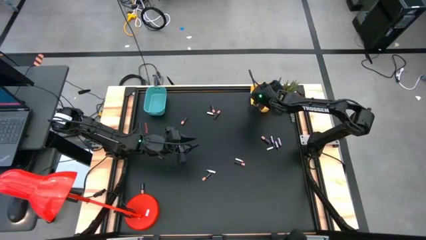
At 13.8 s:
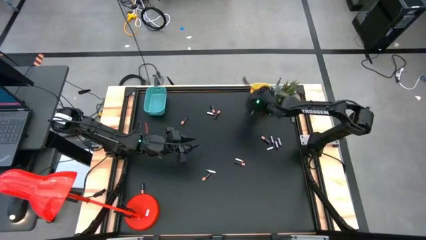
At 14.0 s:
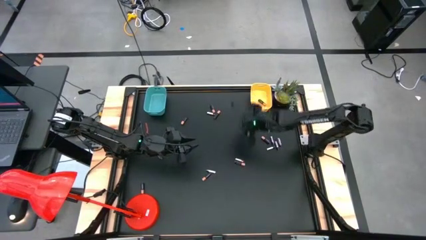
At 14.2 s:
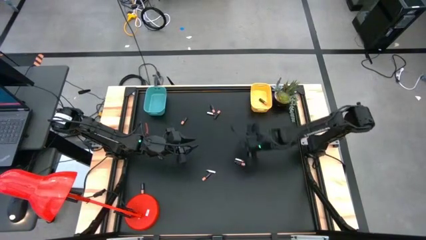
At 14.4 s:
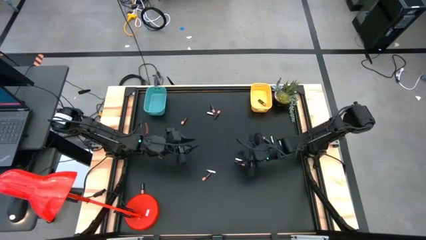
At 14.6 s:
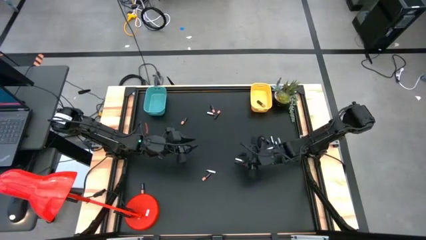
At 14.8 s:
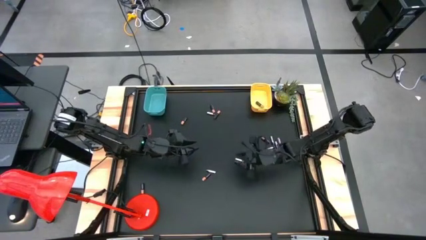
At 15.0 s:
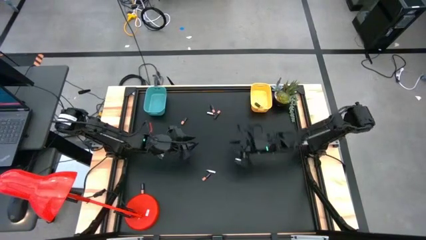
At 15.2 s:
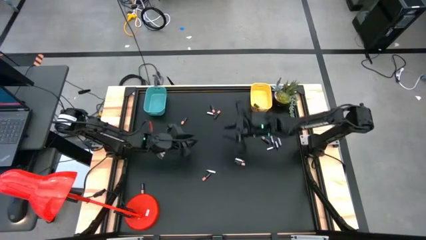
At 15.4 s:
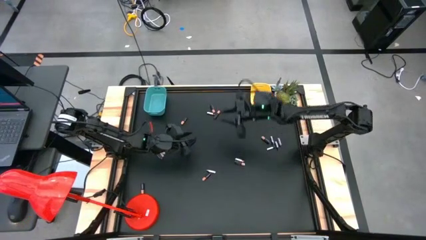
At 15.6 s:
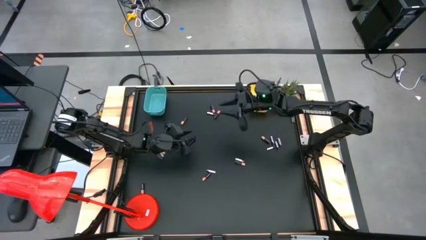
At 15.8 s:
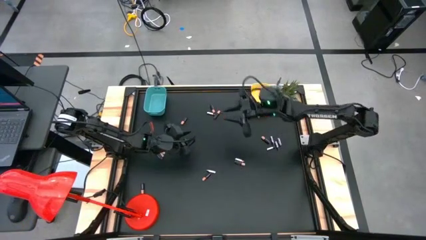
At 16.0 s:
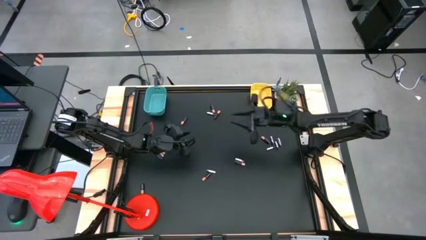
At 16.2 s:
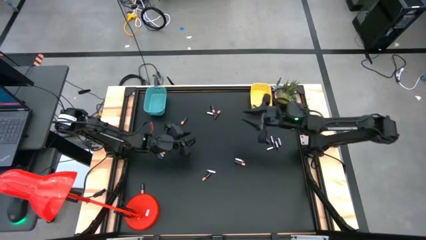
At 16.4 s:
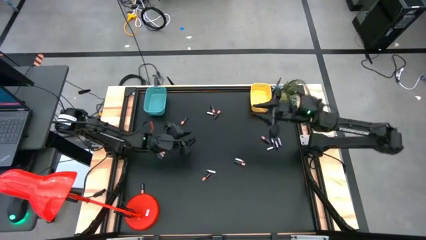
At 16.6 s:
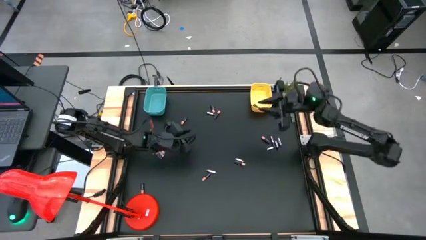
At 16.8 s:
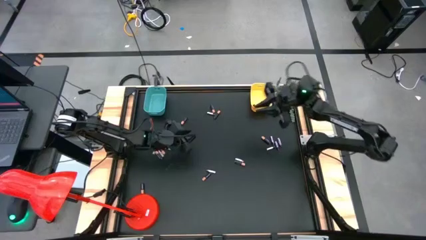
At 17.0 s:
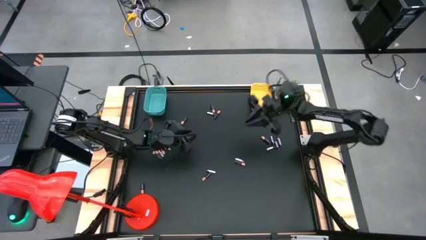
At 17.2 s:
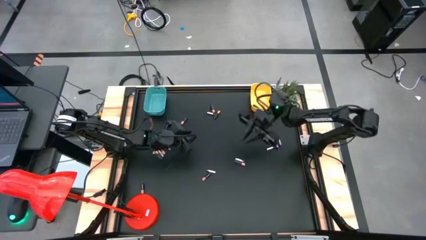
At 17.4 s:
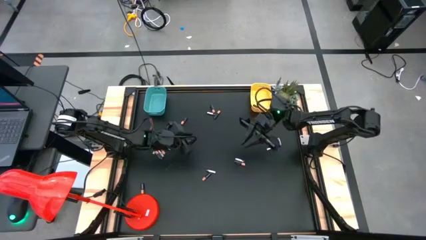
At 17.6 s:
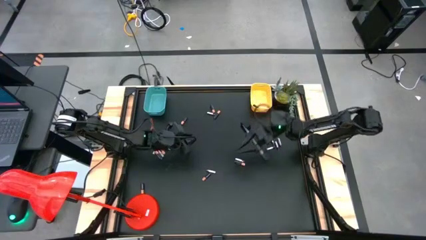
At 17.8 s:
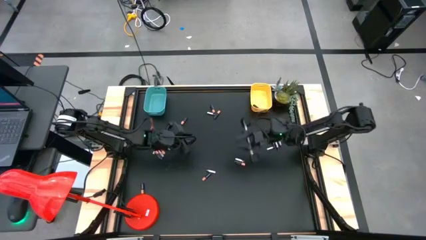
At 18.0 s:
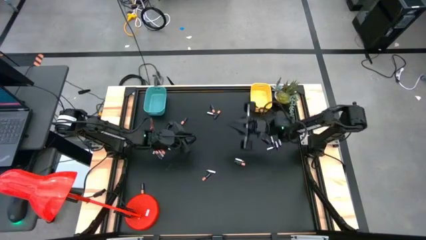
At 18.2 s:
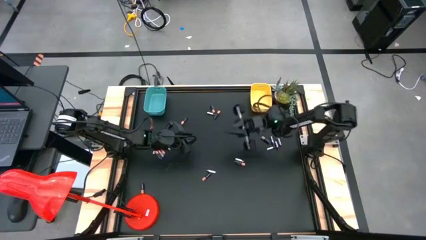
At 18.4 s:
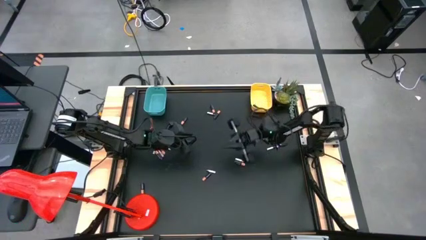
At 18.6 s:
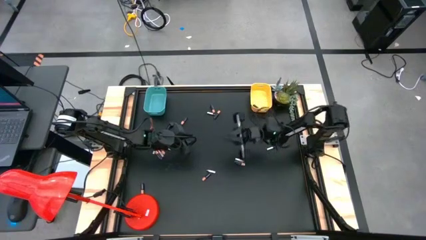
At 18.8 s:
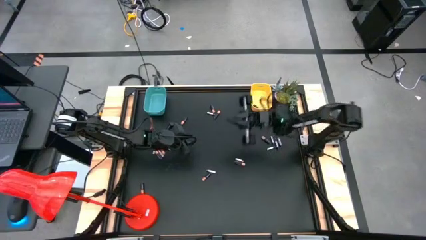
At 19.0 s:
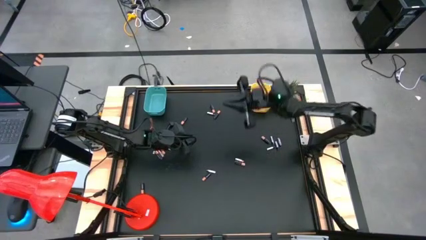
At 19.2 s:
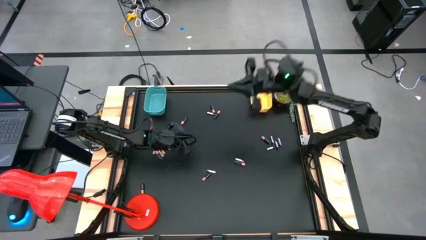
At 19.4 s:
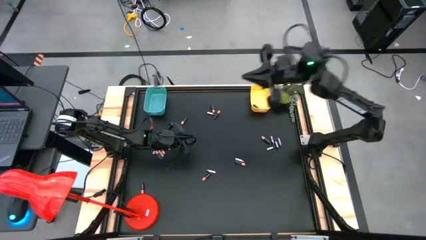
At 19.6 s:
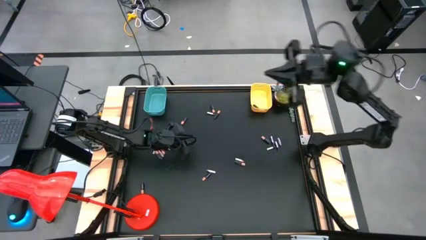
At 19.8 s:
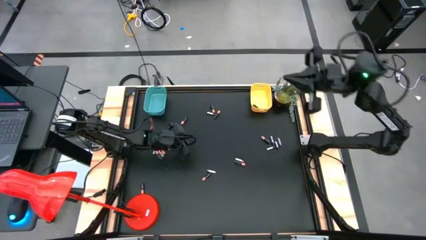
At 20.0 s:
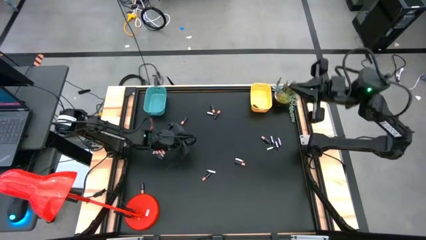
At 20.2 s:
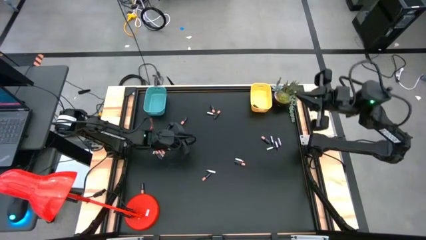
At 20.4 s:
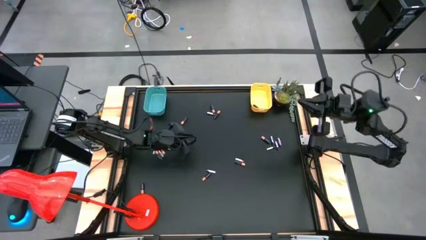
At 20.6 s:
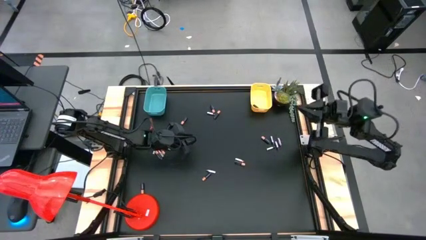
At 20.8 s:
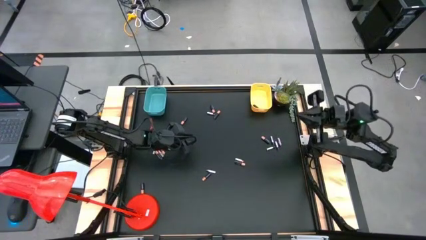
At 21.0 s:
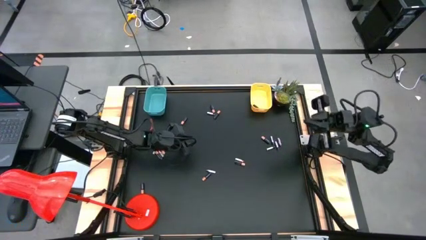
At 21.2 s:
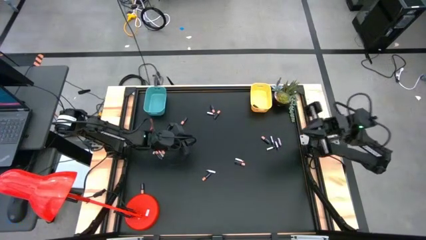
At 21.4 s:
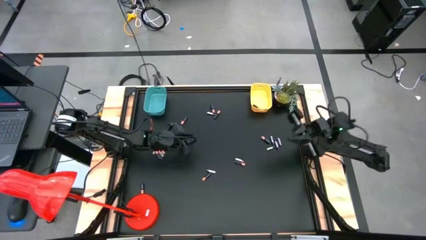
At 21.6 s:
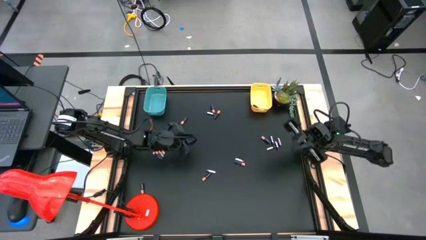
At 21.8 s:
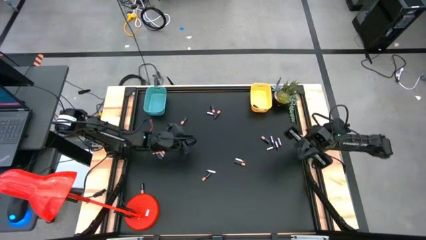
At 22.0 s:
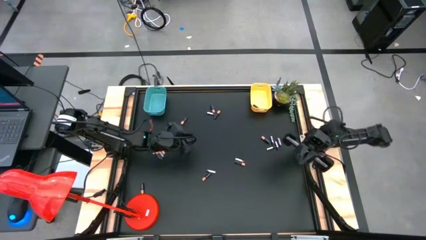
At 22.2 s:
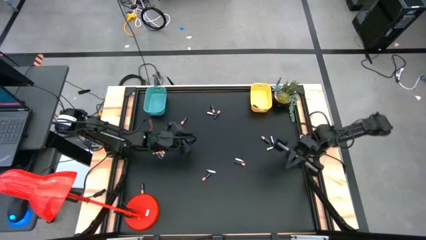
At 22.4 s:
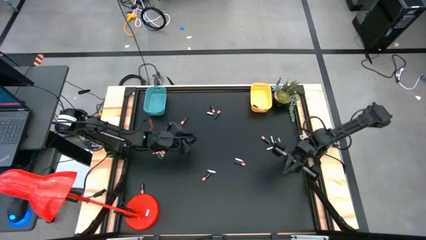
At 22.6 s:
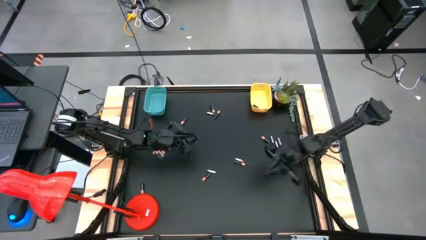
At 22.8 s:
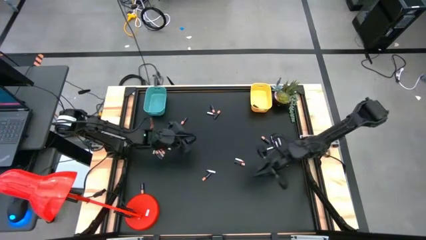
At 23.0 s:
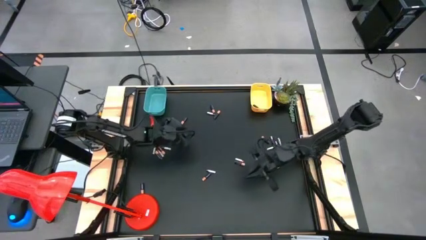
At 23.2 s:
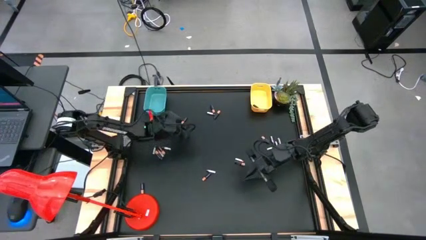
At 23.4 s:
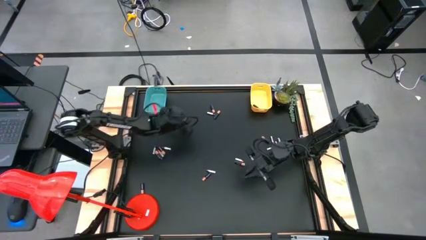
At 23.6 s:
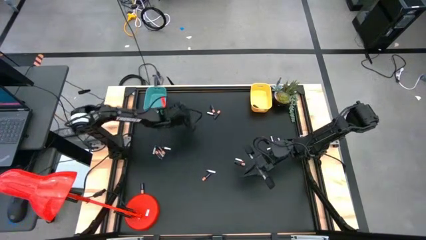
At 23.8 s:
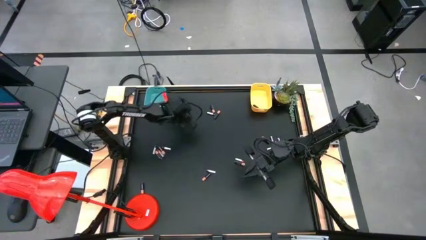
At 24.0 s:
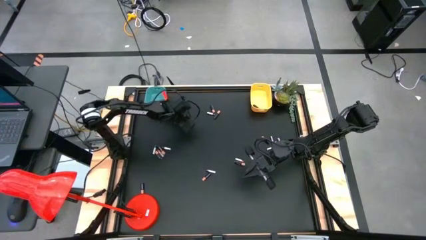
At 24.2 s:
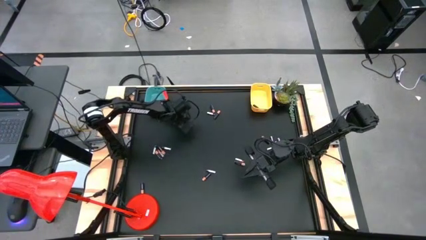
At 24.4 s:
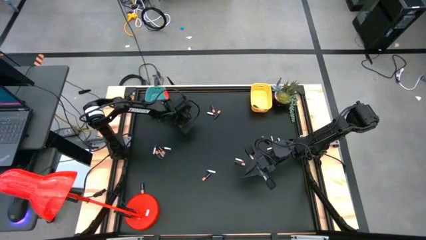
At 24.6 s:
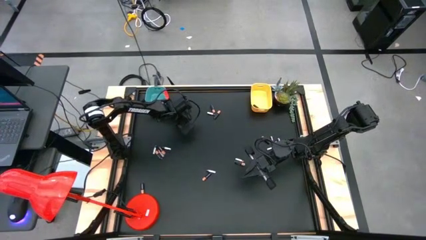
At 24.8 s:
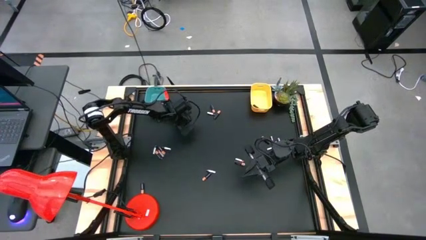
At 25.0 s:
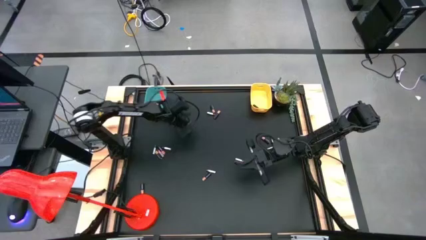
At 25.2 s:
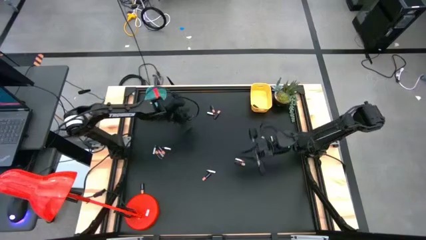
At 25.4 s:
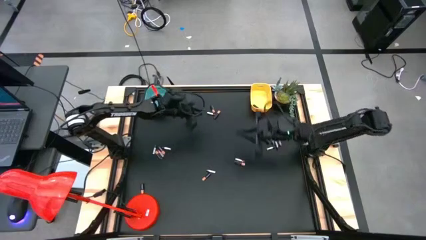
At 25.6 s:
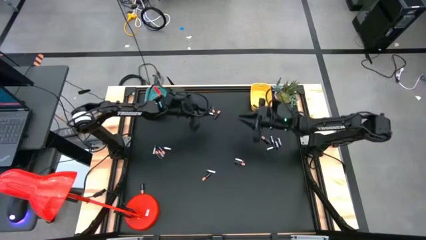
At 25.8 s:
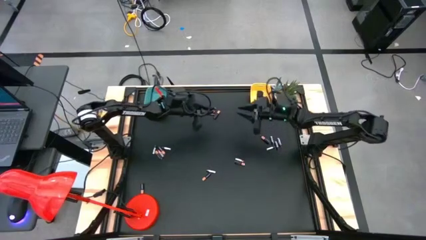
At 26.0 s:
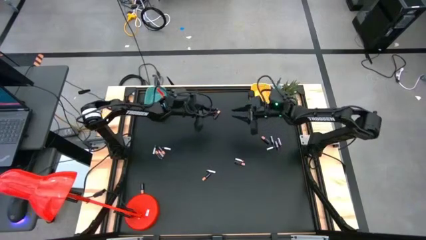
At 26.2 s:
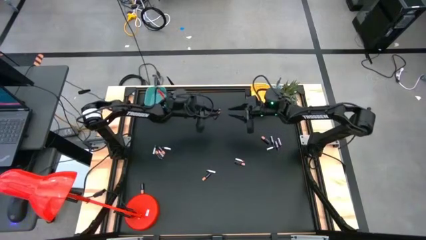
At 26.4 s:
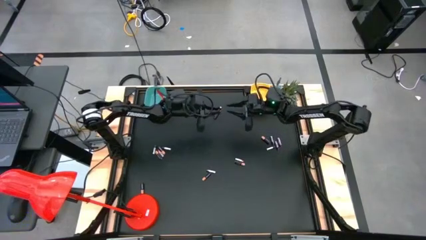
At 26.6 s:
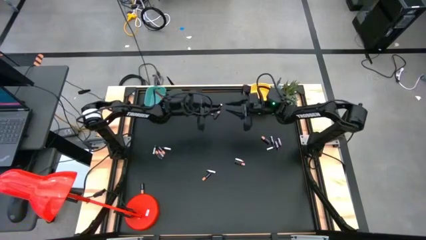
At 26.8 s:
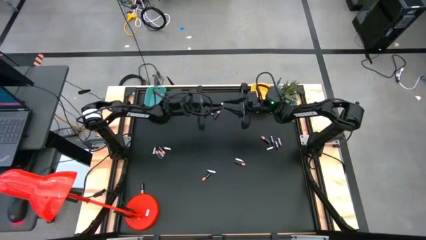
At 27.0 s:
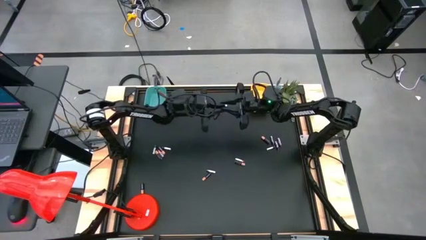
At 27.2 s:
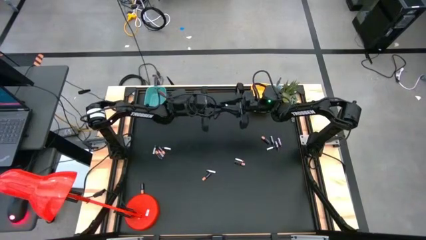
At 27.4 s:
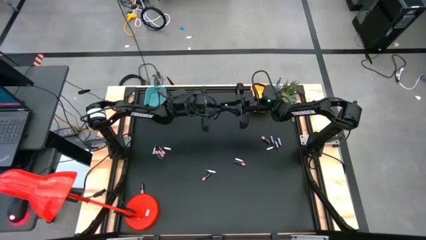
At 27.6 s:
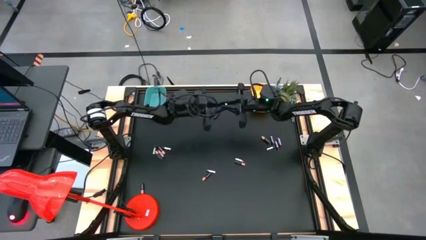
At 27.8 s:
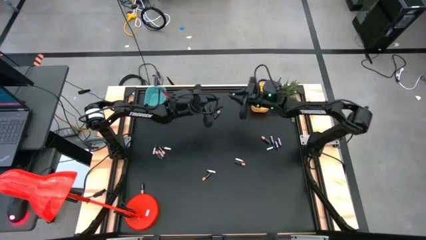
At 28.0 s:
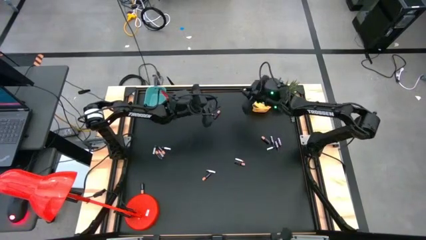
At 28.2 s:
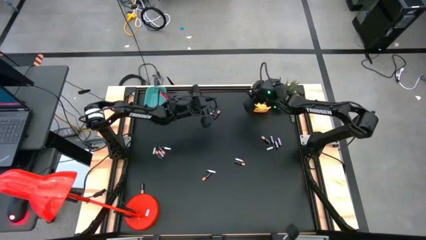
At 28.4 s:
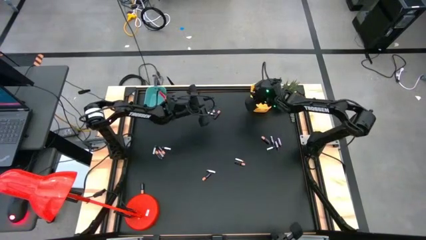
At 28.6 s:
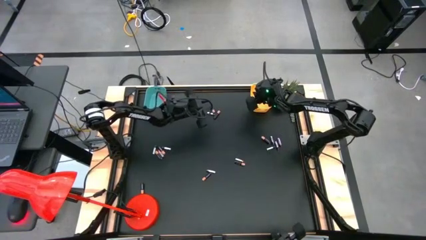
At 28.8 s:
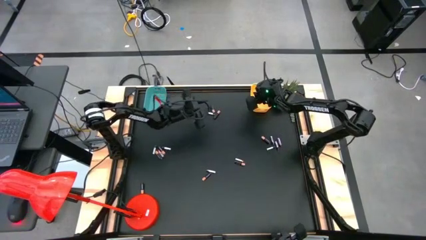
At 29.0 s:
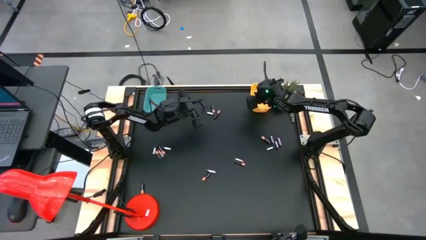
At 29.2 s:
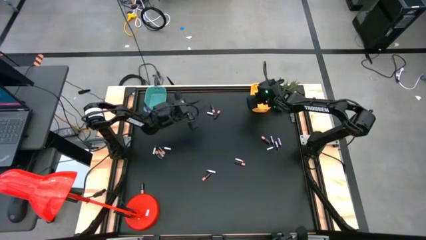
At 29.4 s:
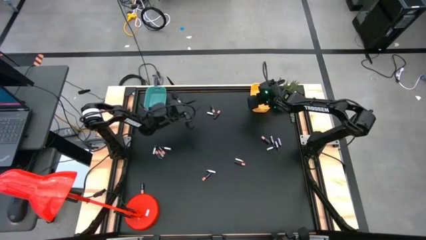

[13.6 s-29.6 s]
Task: Sort batteries
Put the black battery into the yellow bin
